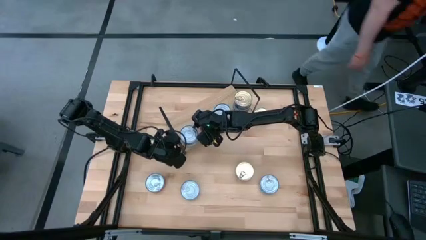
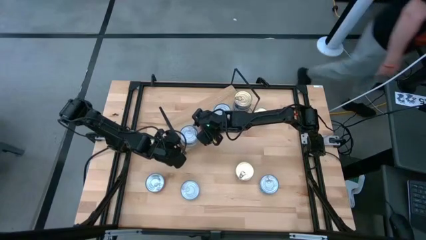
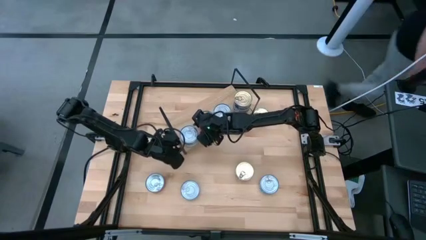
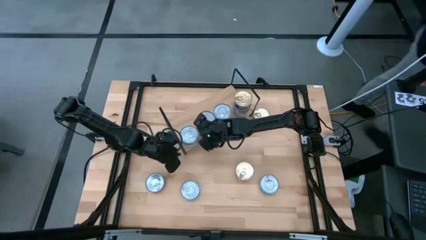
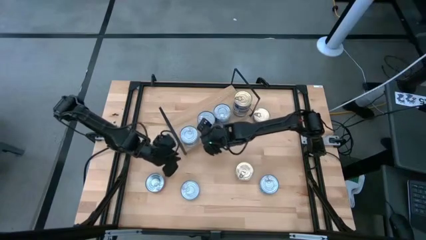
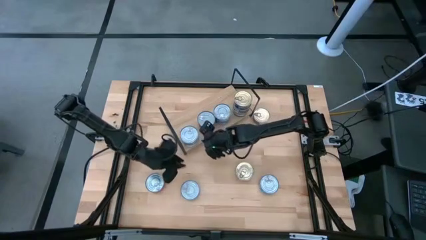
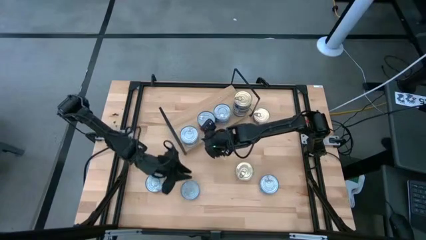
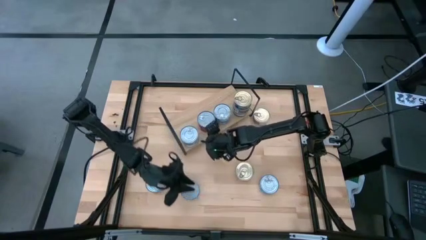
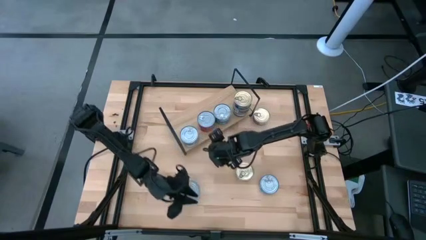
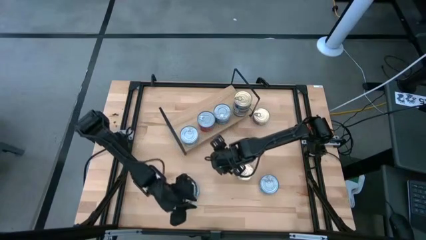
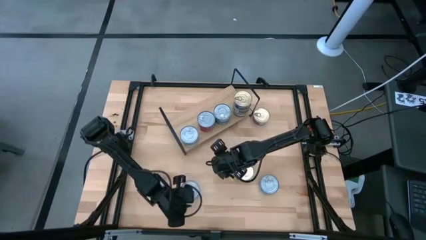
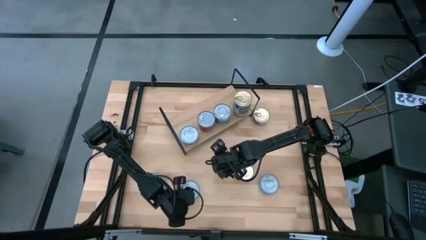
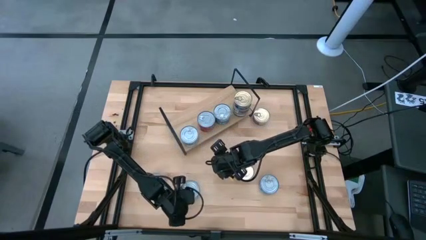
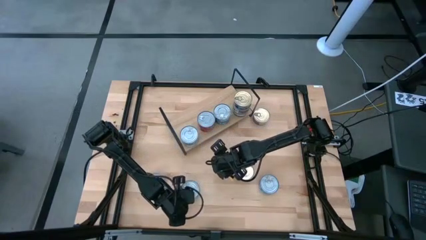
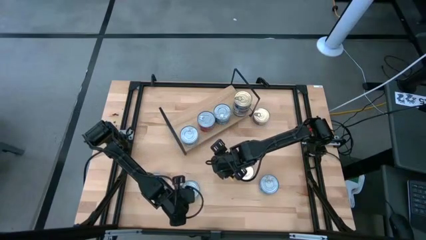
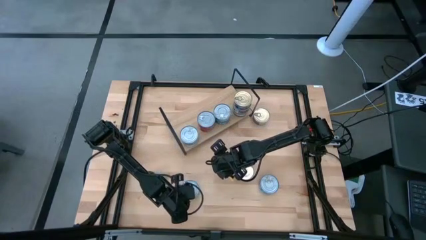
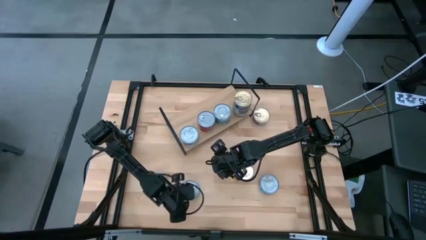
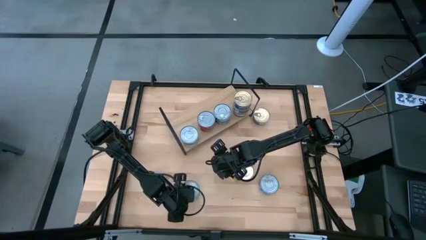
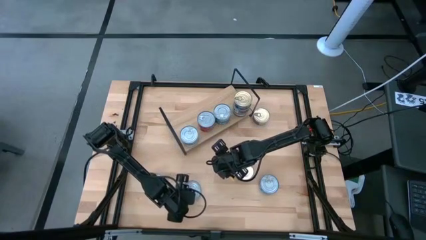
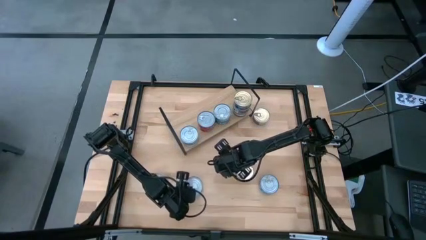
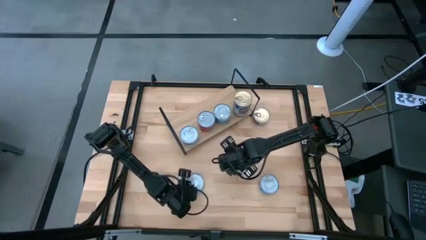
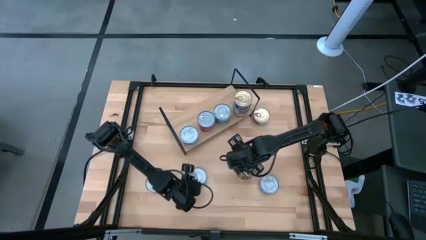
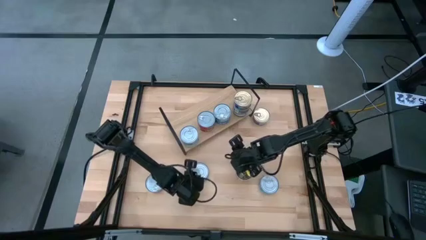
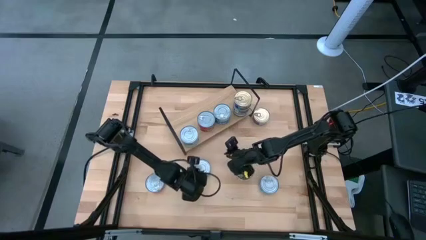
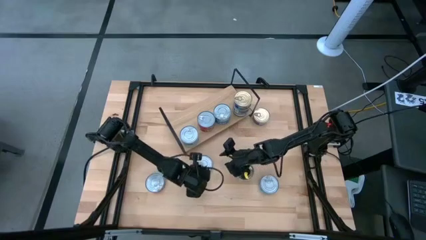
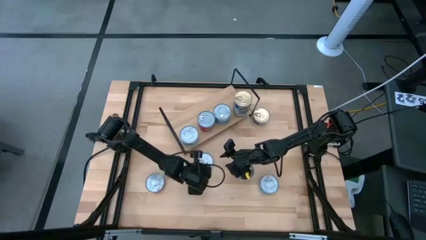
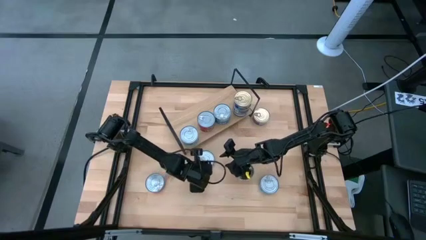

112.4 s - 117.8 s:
Task: Stack canned seafood by type on shelf
Stack the yellow blue tuna can on top of the yellow blue tuna cans on the shelf

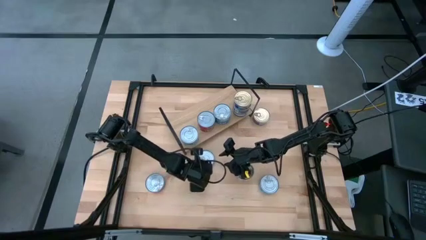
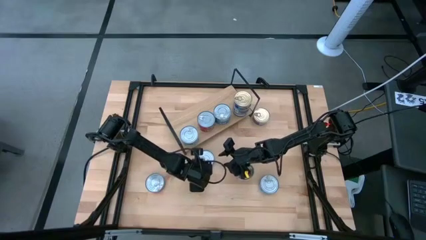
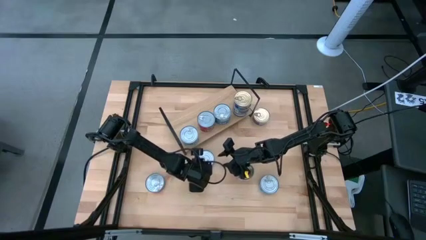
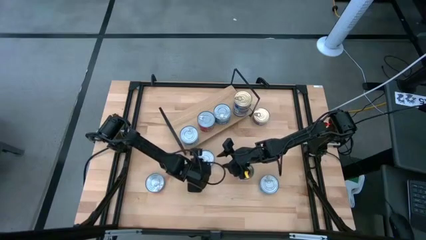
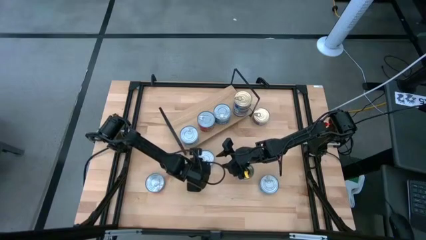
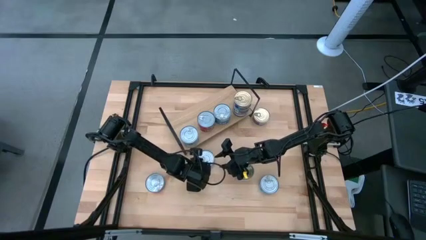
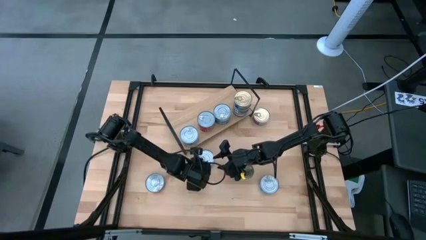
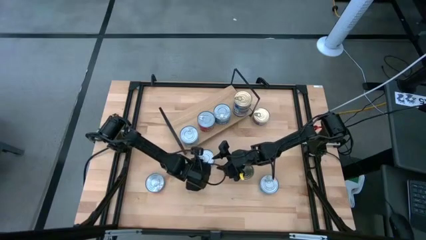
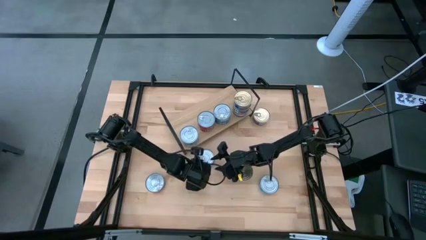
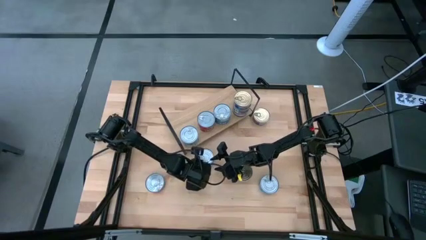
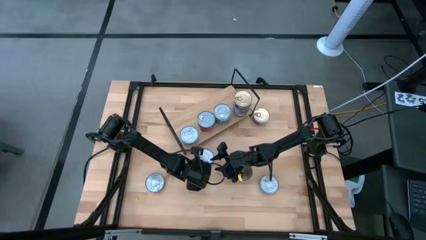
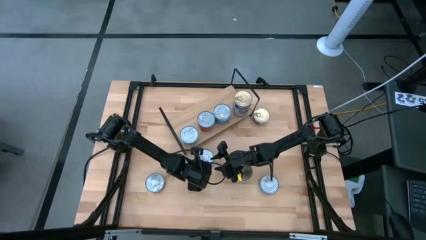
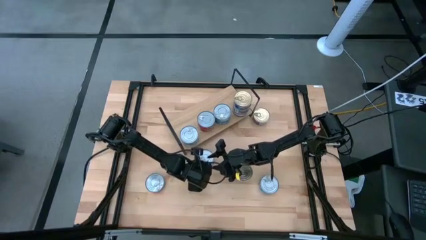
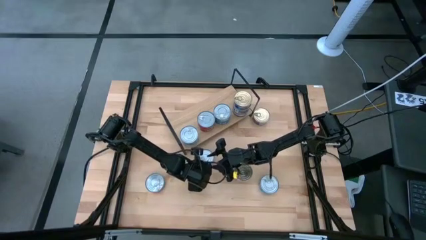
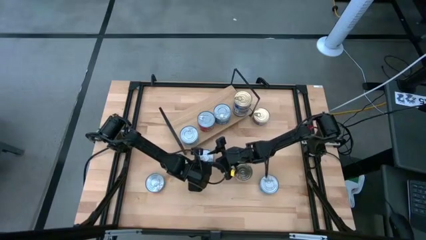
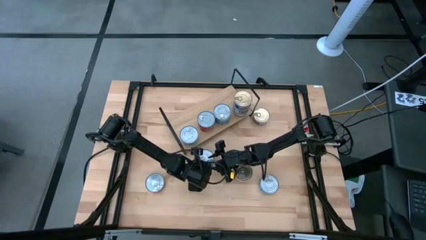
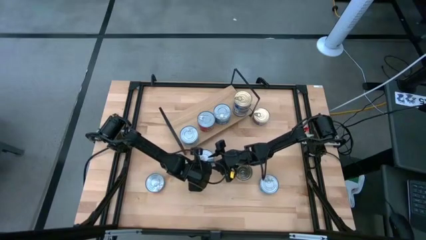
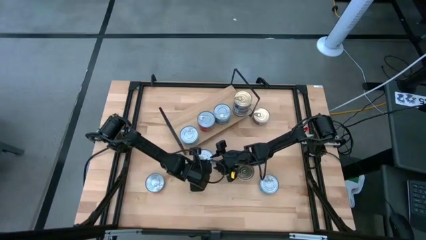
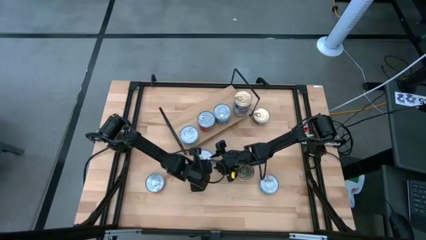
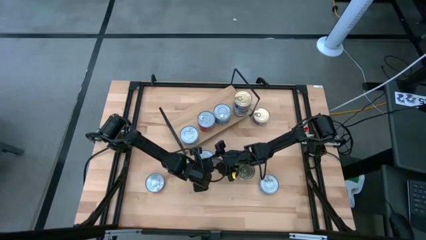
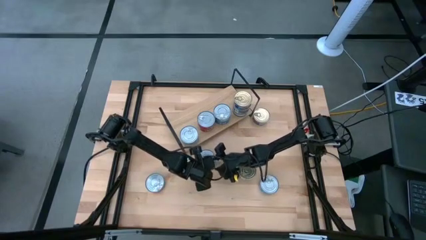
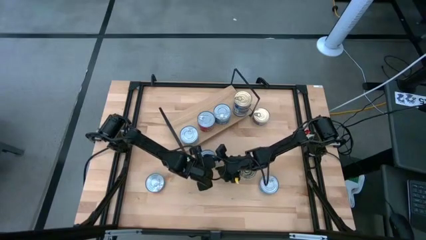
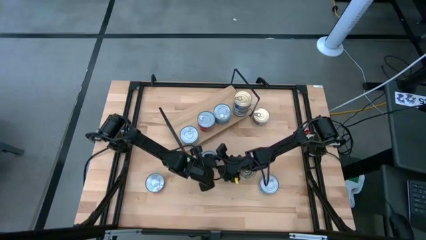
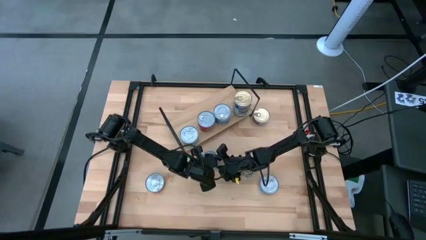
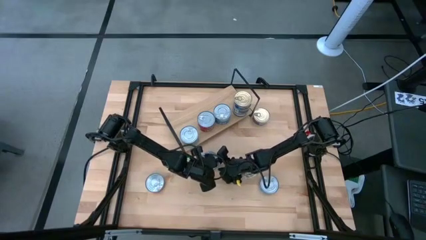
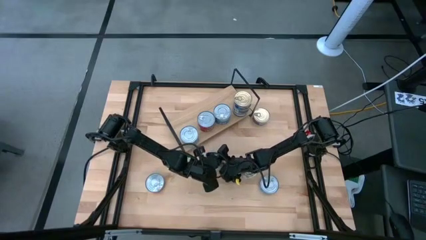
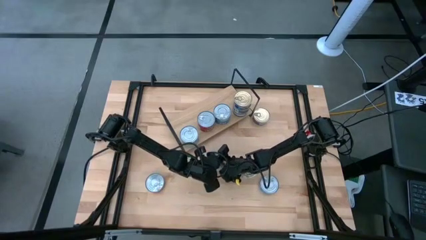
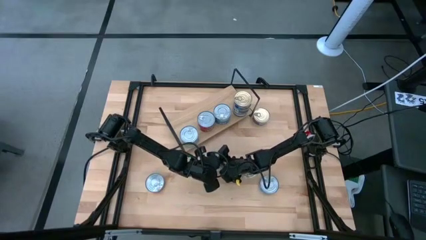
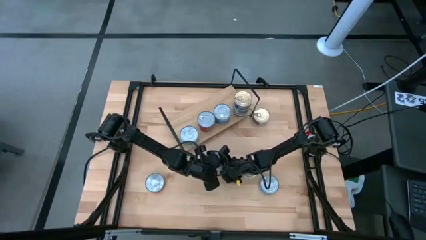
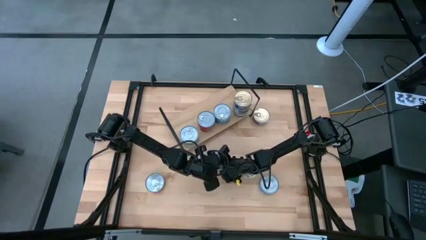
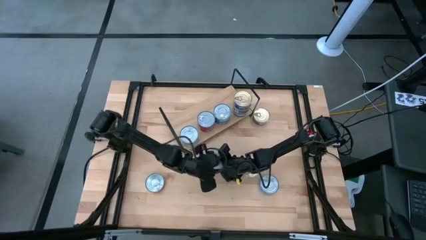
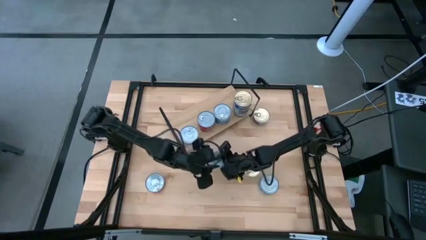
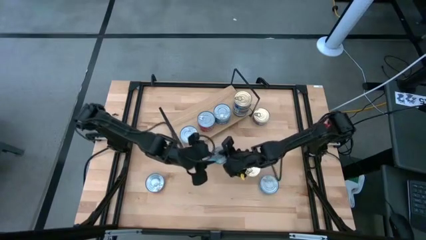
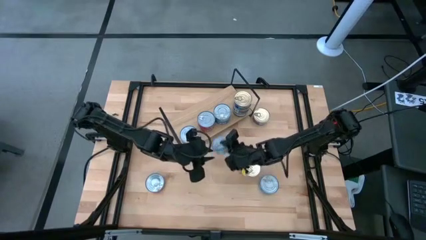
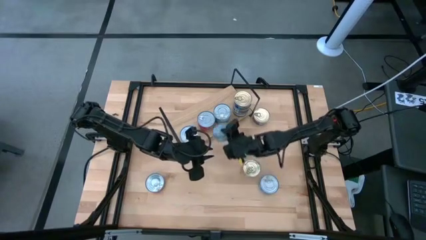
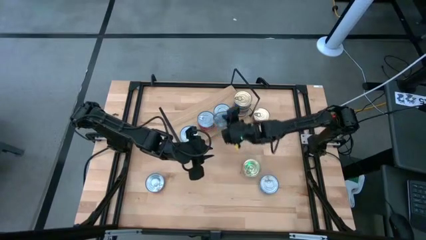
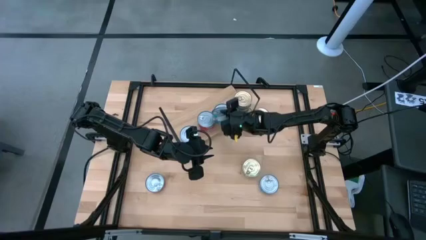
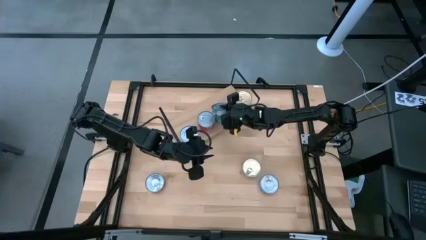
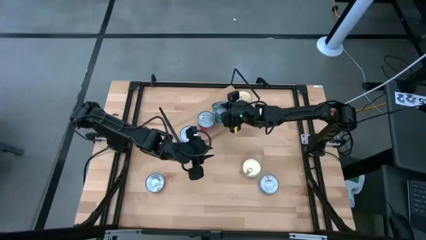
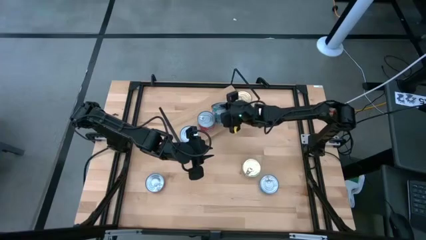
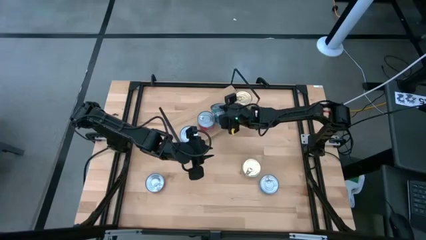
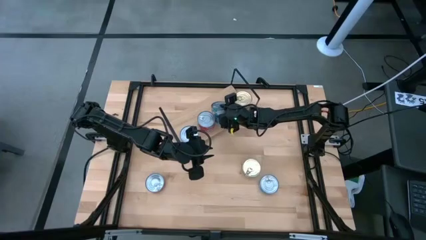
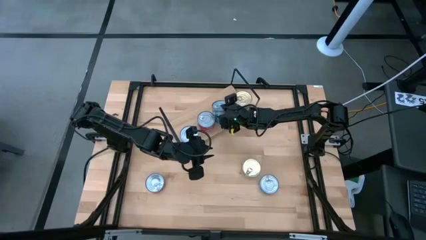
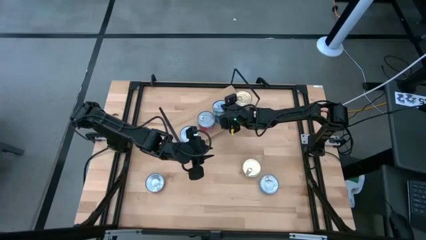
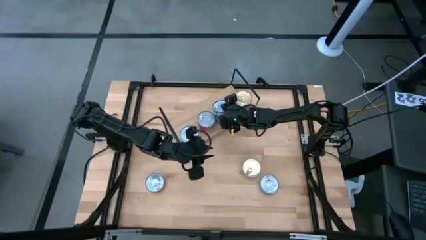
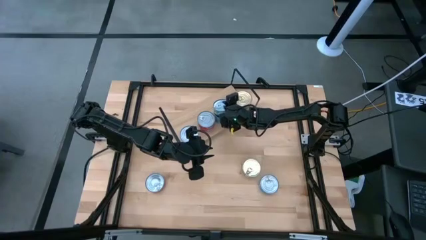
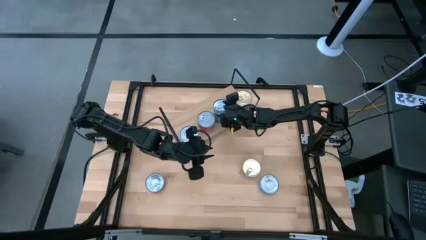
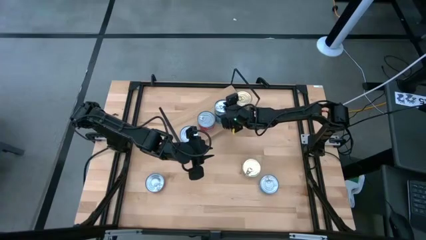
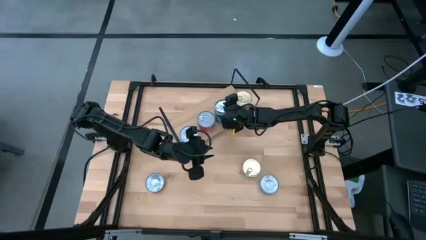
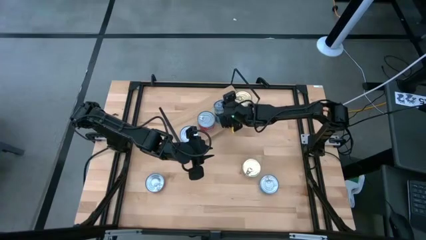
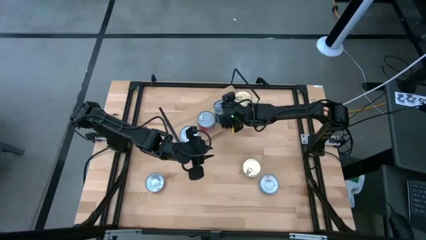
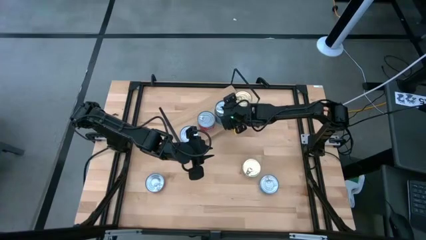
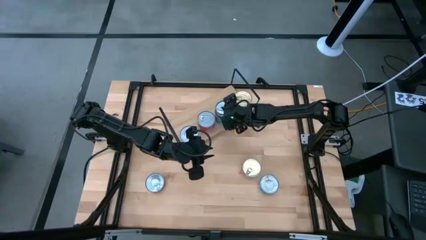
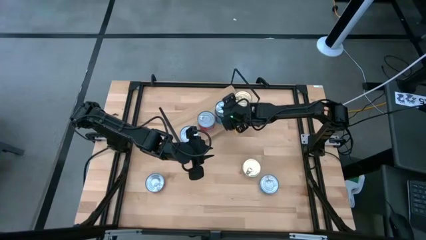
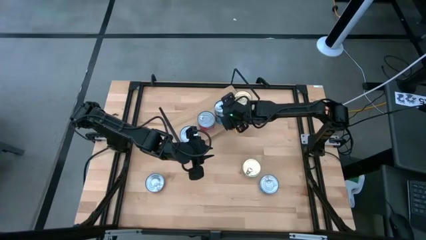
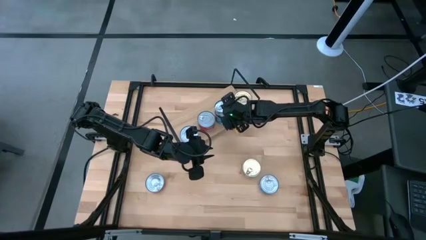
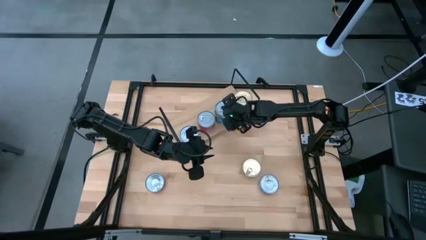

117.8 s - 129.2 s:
Stack the yellow blue tuna can on top of the yellow blue tuna cans on the shelf

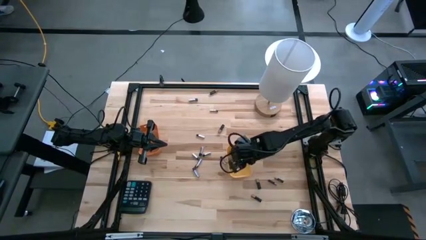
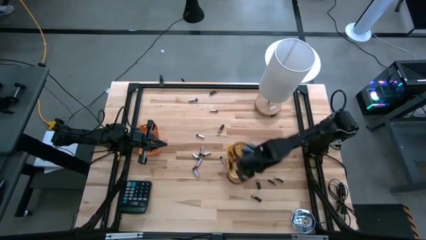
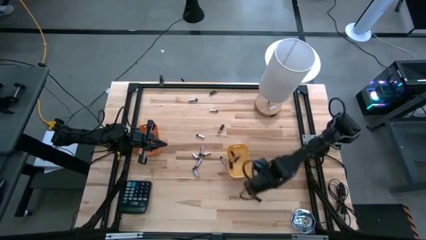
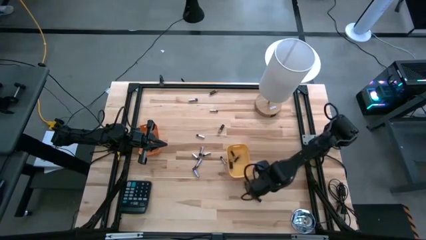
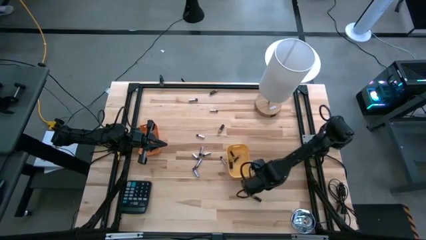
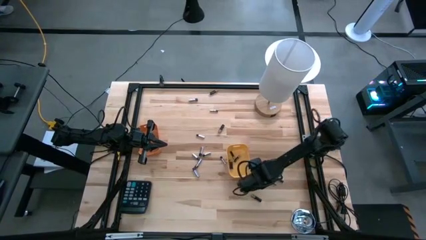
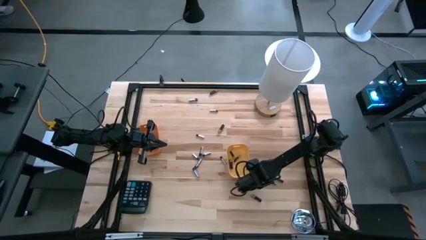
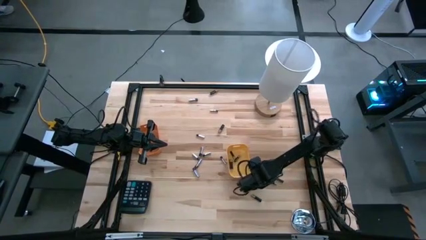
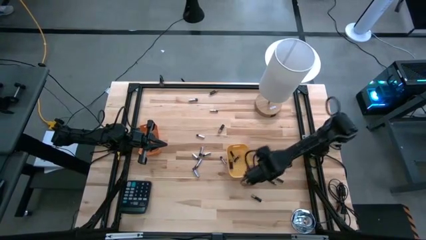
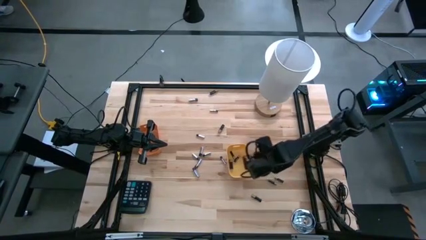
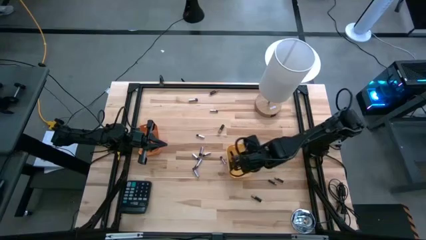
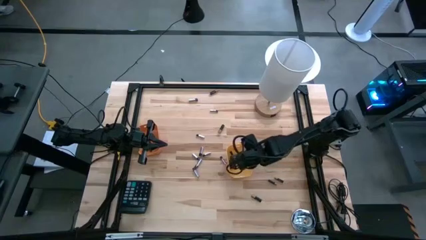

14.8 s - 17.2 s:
Task: Sort batteries
Put the black battery into the yellow bin
